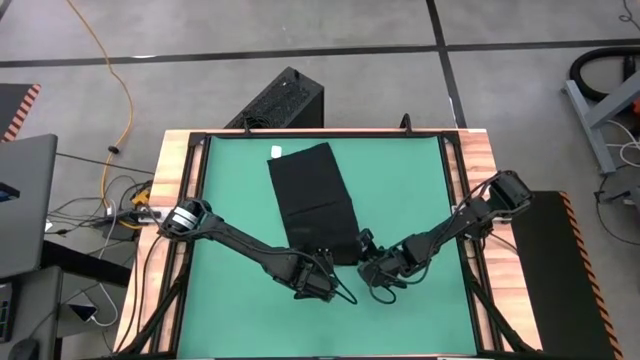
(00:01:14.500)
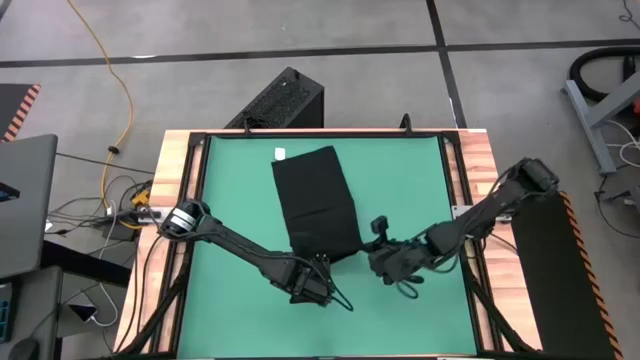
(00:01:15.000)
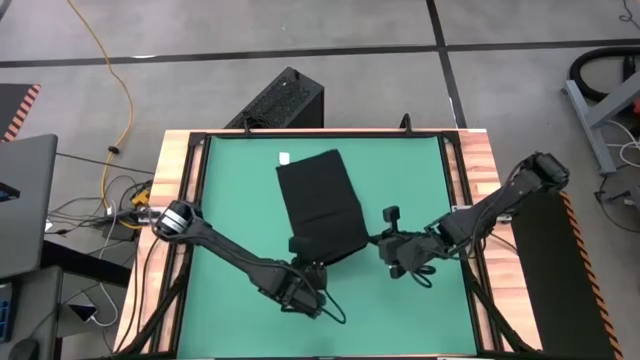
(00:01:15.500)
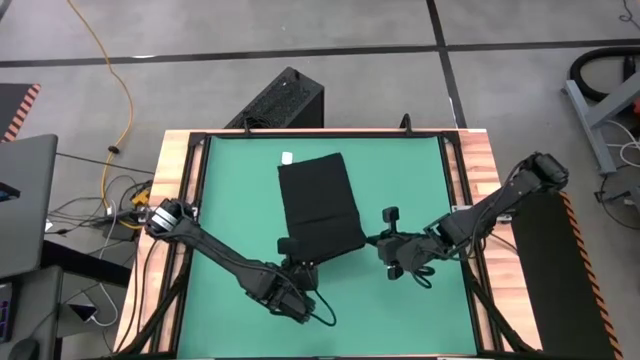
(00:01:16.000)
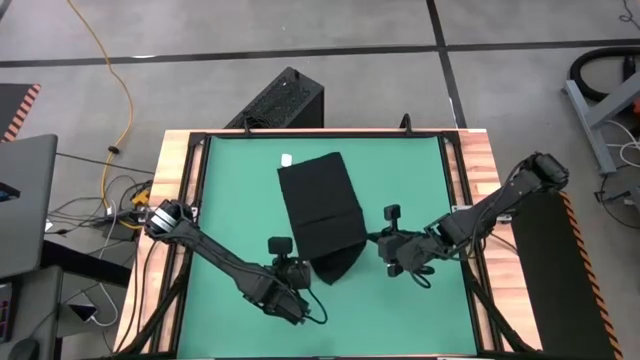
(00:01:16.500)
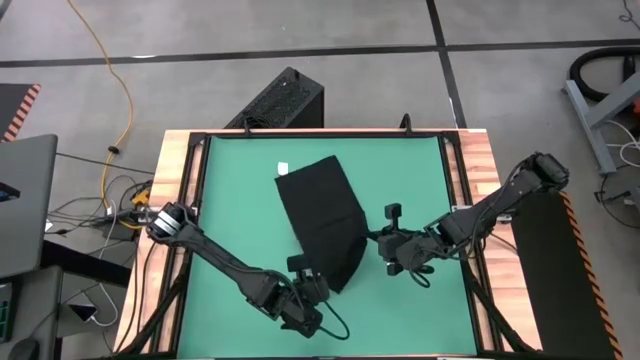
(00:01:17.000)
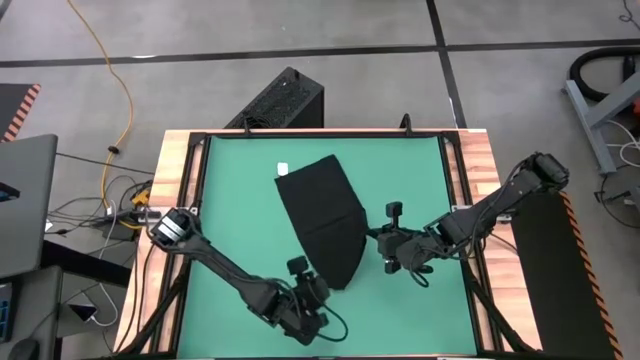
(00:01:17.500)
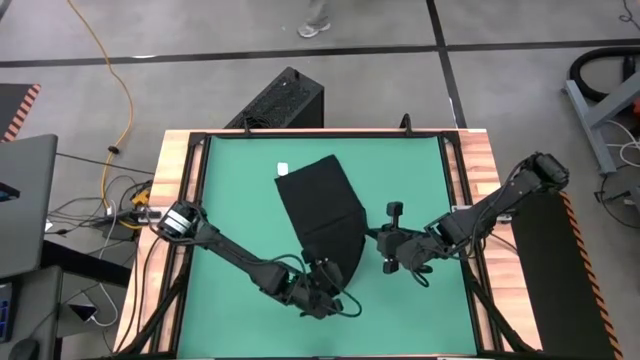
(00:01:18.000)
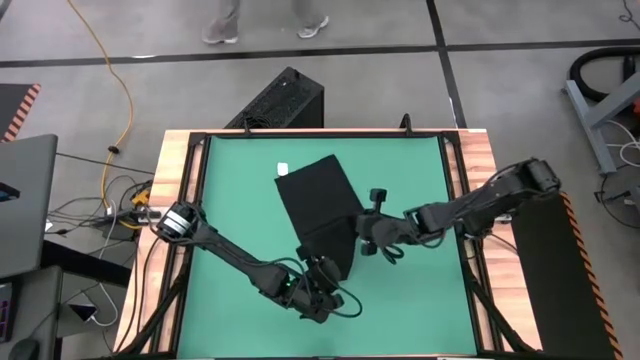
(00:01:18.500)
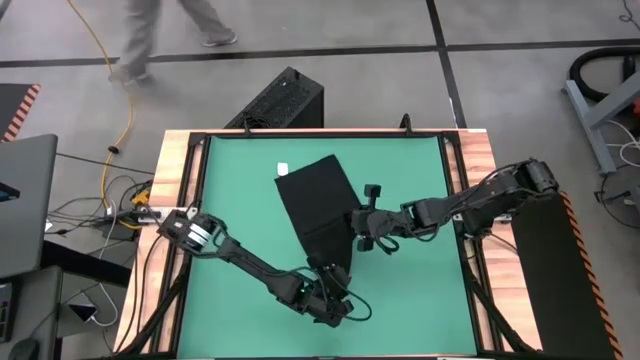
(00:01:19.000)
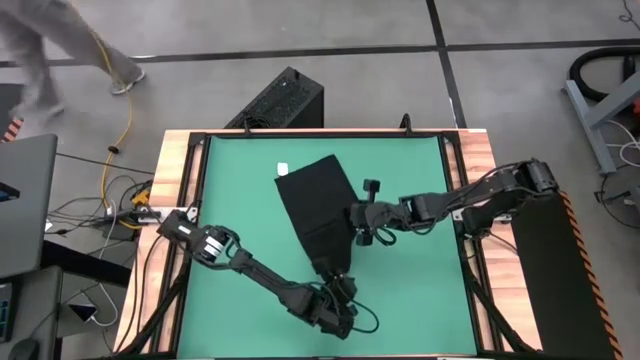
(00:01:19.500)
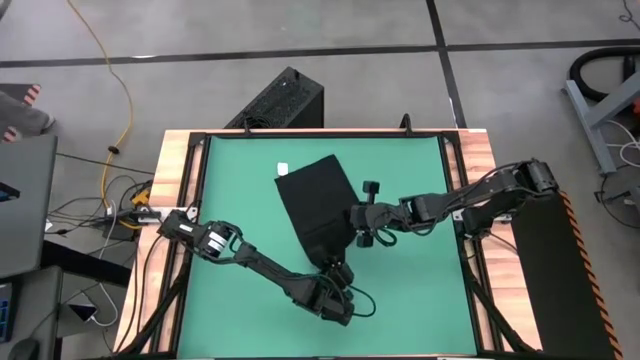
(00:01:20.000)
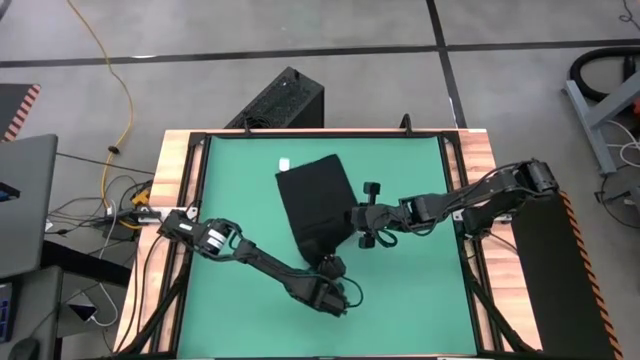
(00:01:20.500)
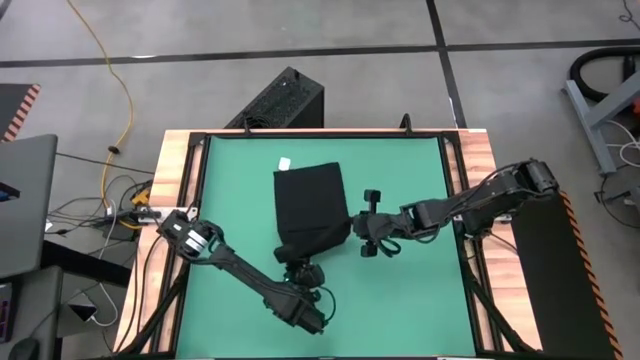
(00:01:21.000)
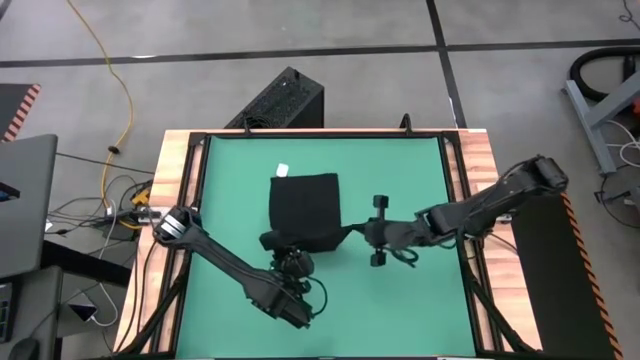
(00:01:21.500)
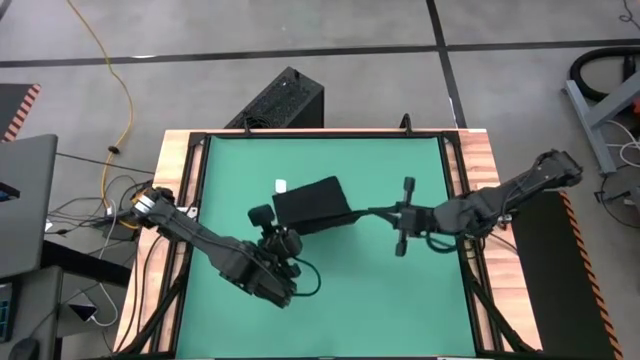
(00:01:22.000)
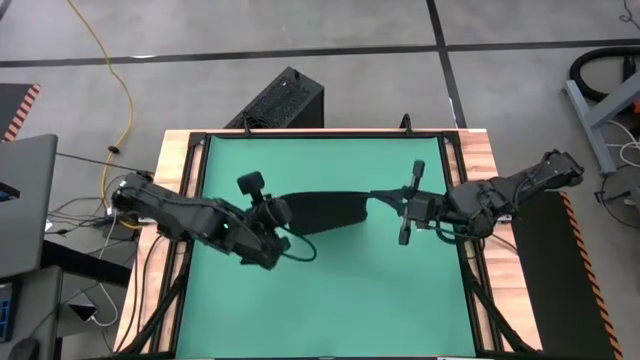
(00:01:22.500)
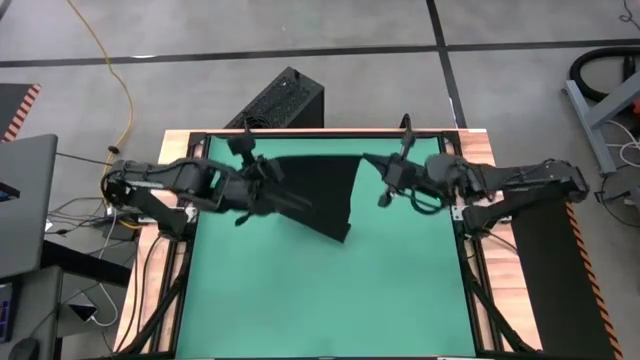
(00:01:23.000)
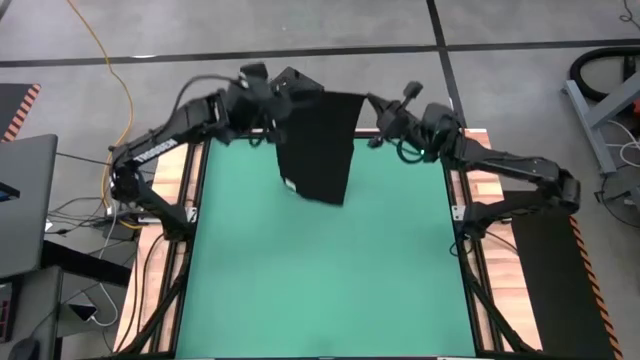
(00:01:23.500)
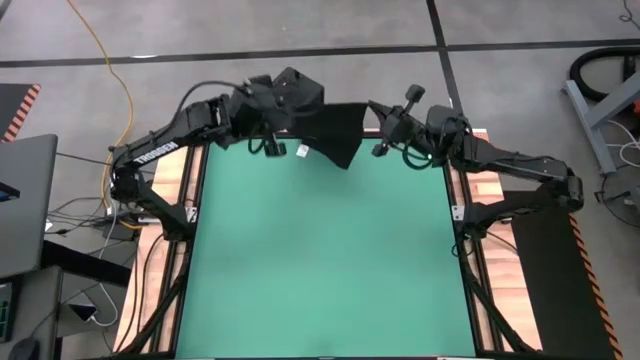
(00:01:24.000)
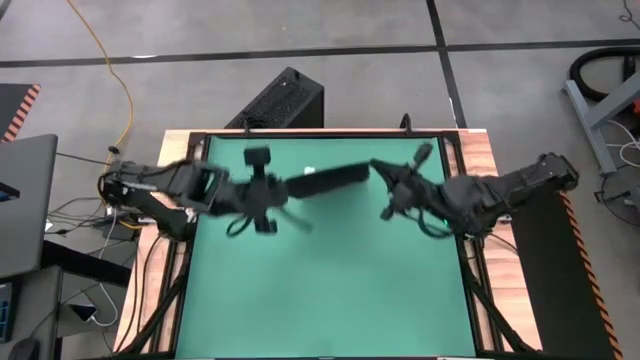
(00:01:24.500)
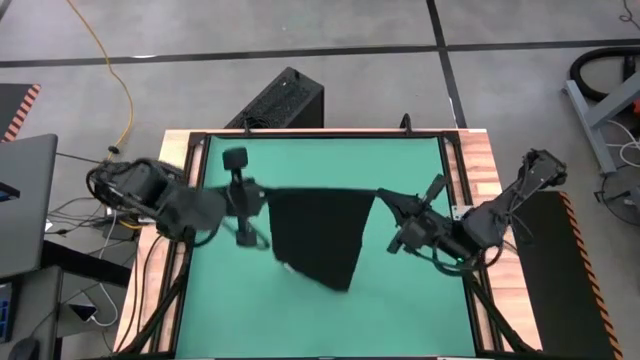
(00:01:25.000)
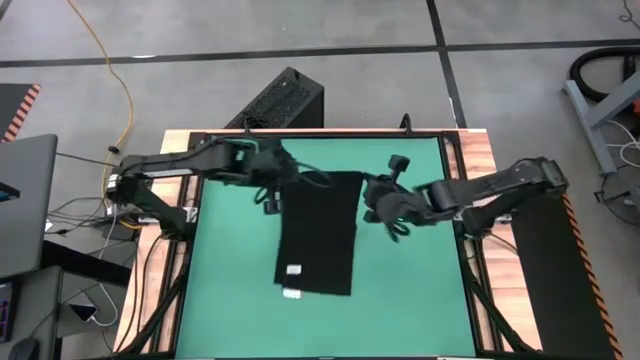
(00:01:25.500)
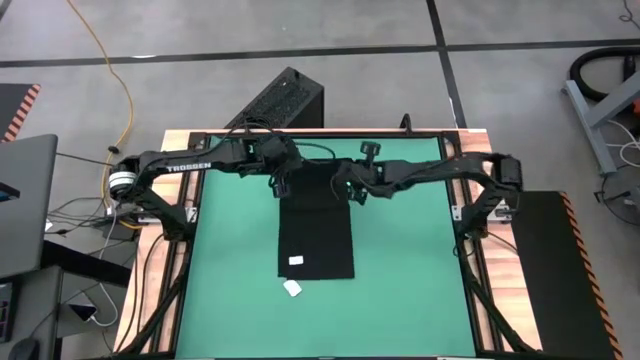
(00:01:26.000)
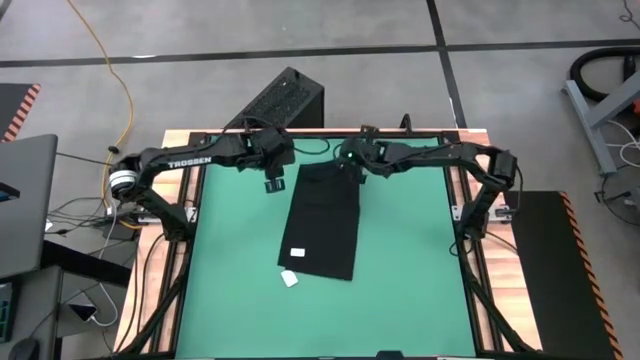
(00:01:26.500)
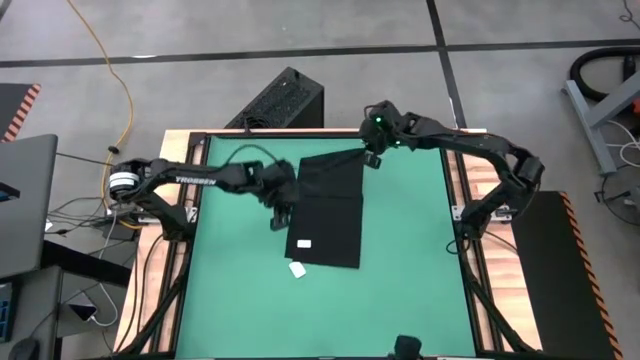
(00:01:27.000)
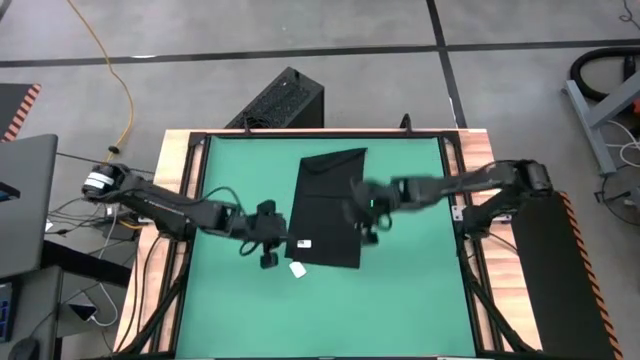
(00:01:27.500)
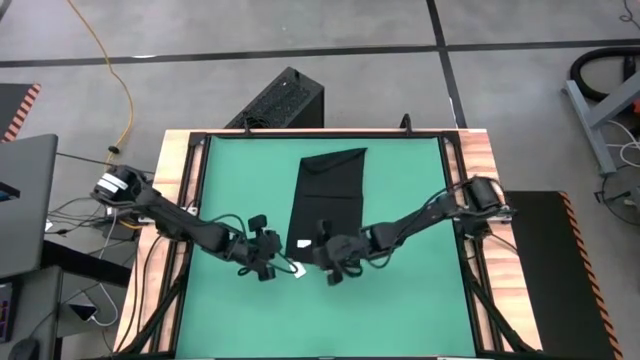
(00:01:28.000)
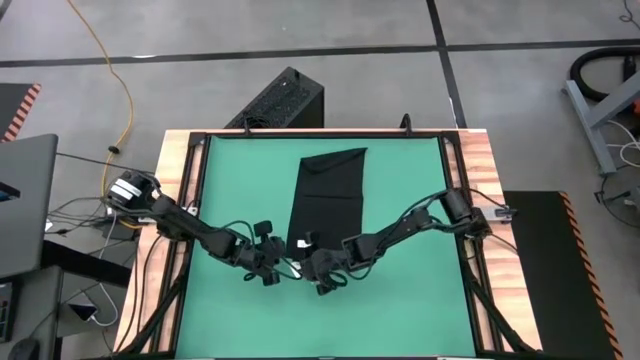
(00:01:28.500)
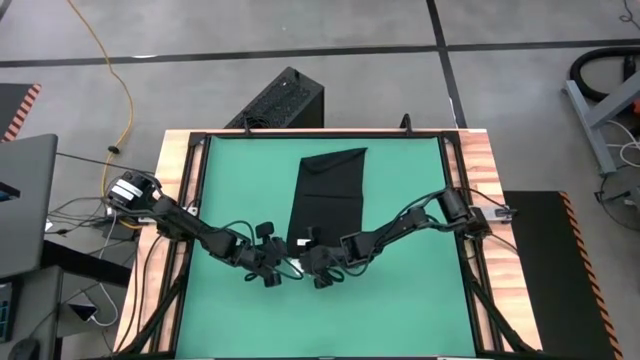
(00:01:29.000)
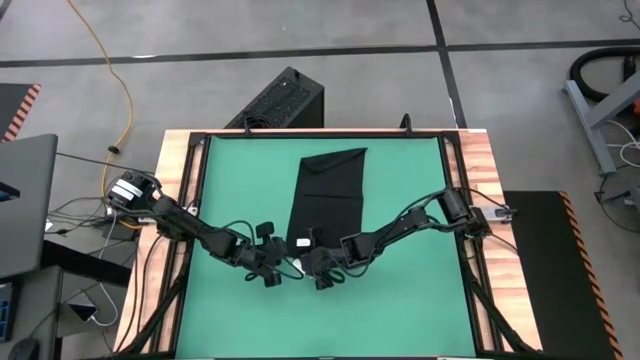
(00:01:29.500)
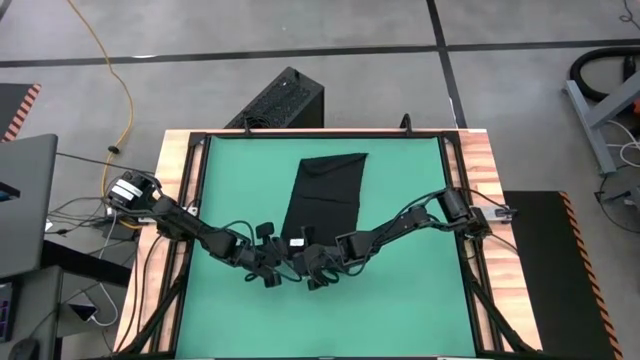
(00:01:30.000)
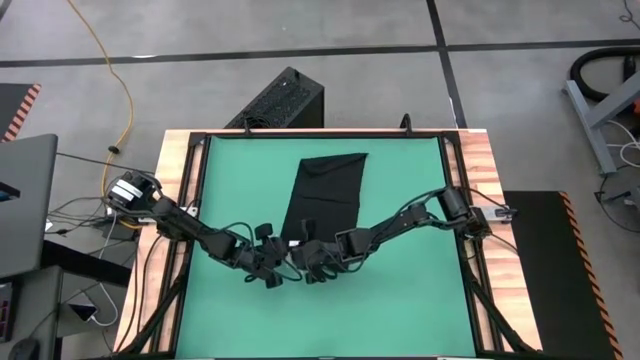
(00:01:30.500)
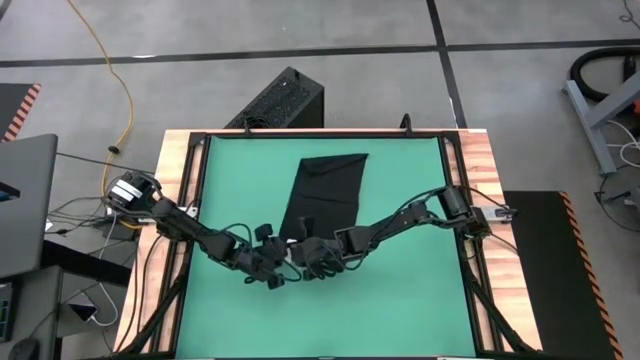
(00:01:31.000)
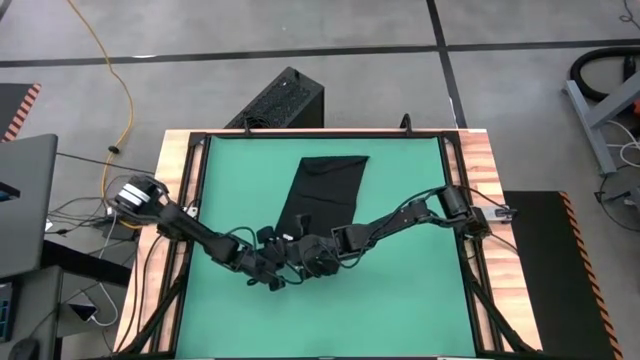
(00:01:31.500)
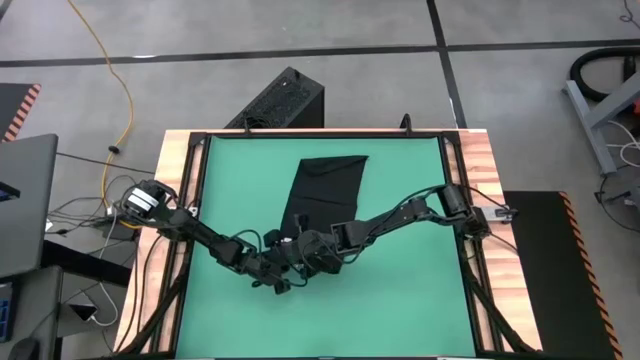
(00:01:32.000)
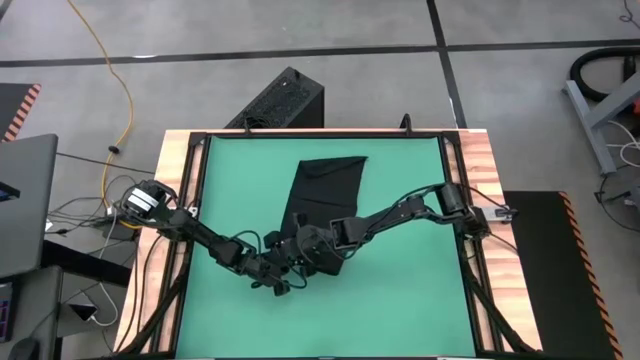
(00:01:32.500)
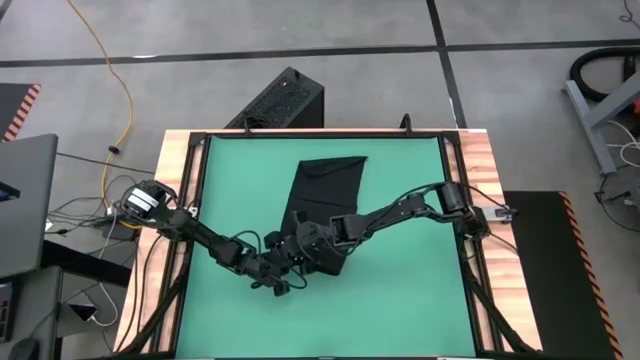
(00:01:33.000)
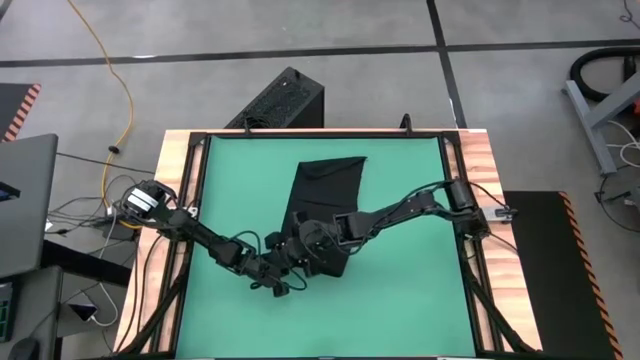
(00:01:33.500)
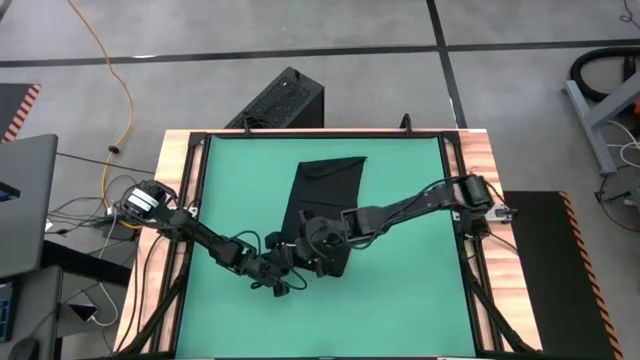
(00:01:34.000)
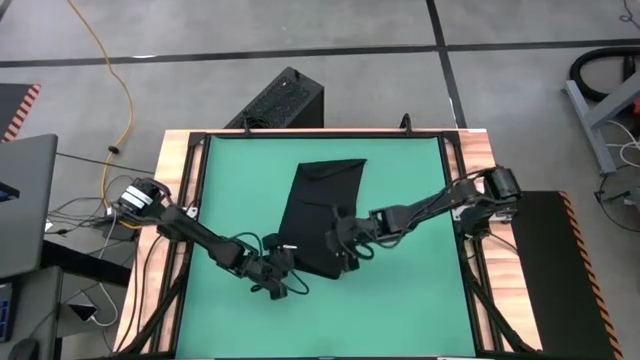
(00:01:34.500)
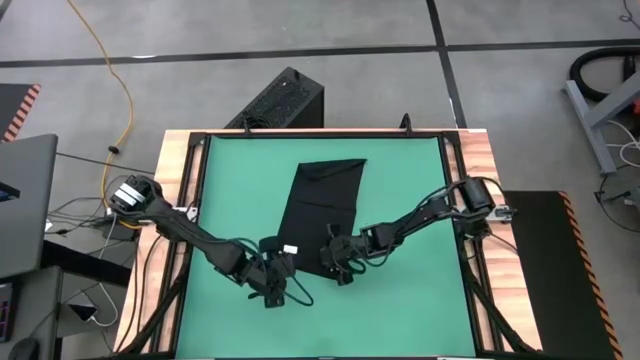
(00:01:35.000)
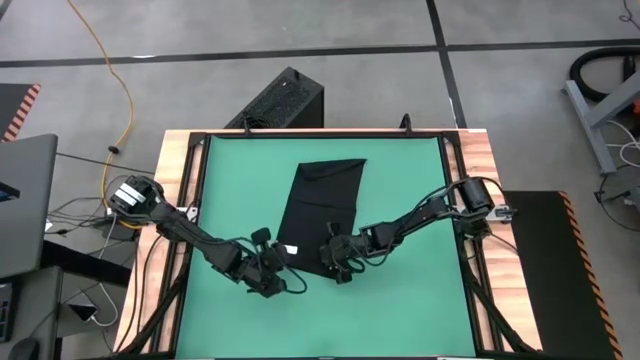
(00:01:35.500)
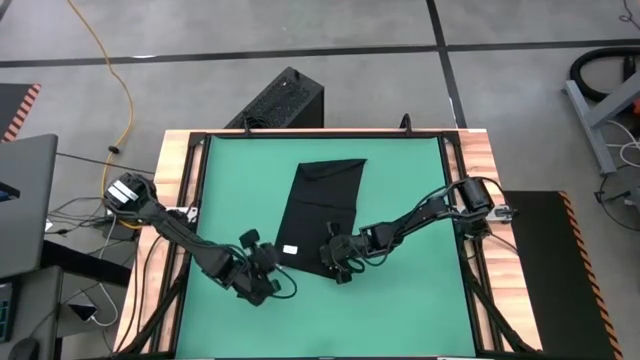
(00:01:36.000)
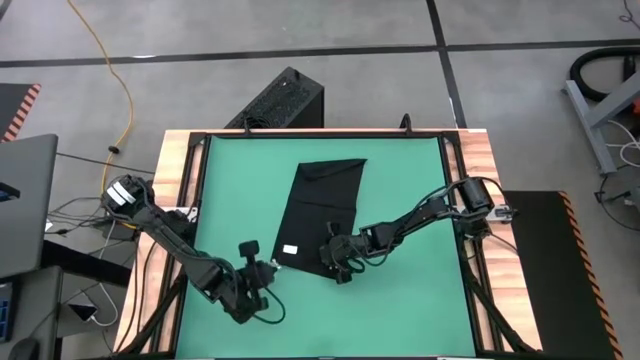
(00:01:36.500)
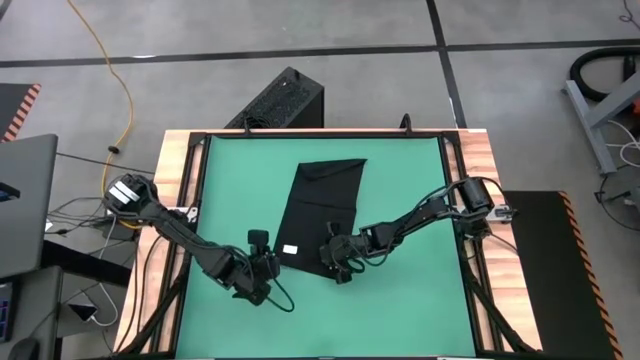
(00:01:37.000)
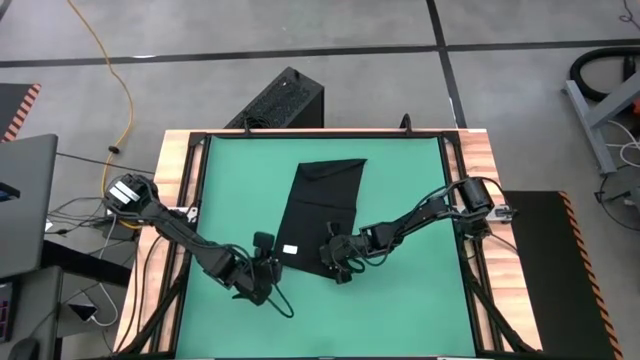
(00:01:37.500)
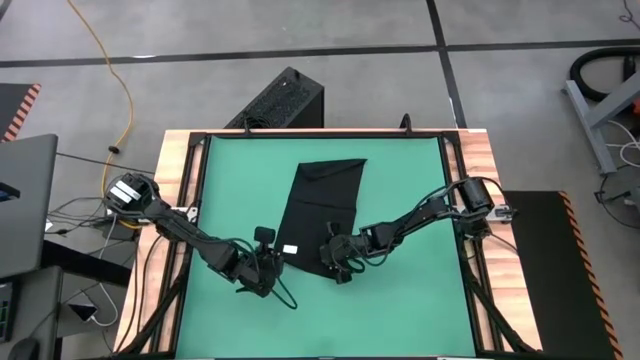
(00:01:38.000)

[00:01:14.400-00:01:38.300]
Task: Roll towel into tight, uniform cylinder
Roll the black towel
